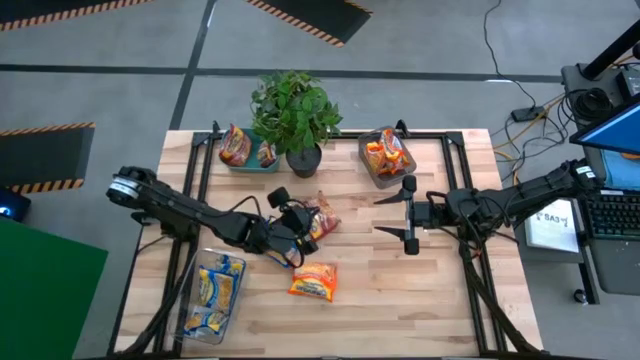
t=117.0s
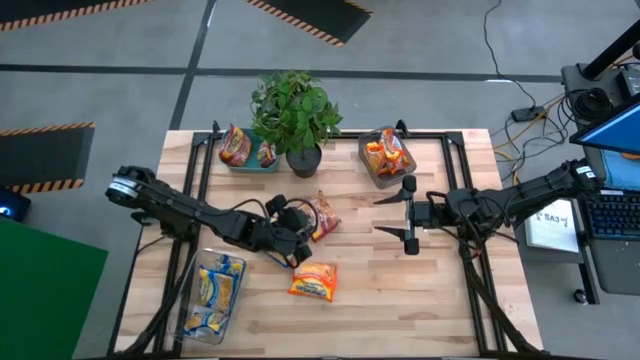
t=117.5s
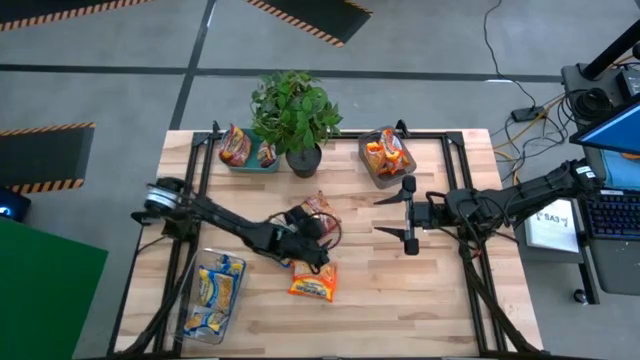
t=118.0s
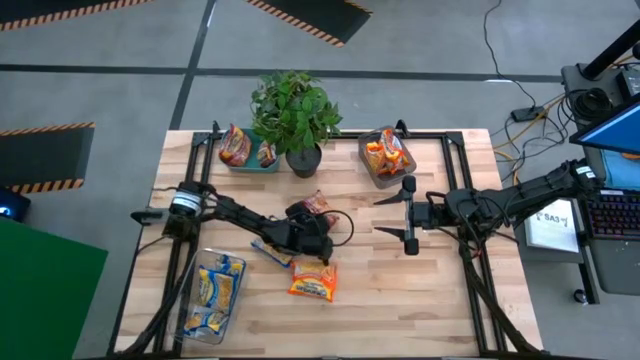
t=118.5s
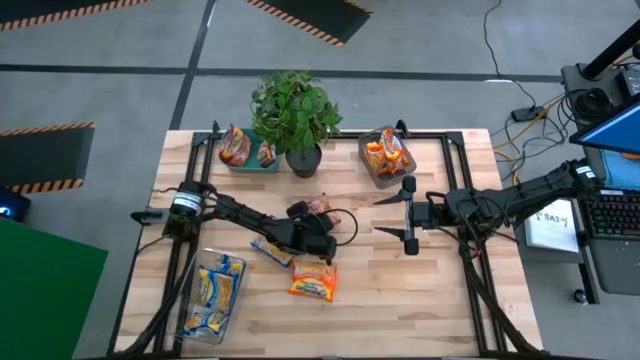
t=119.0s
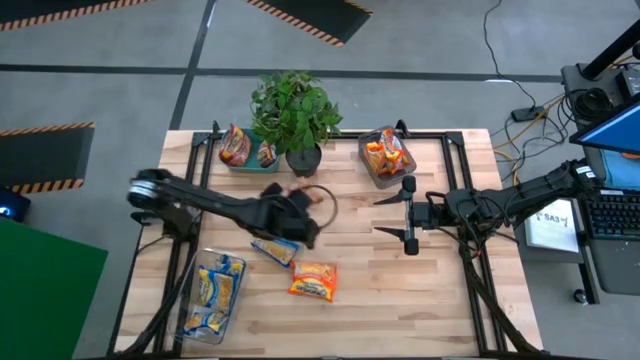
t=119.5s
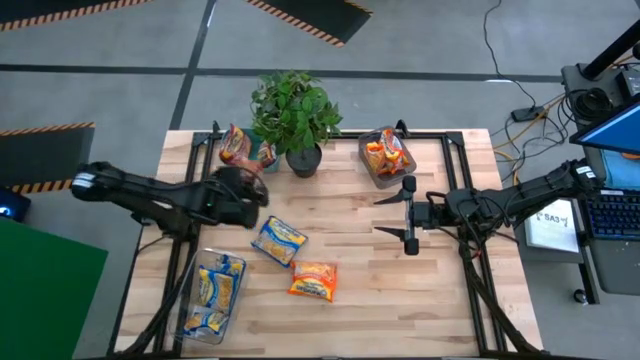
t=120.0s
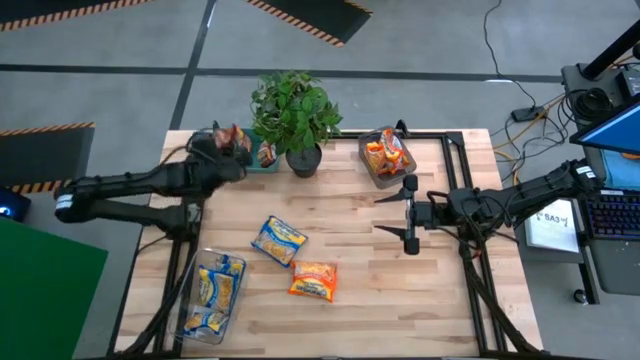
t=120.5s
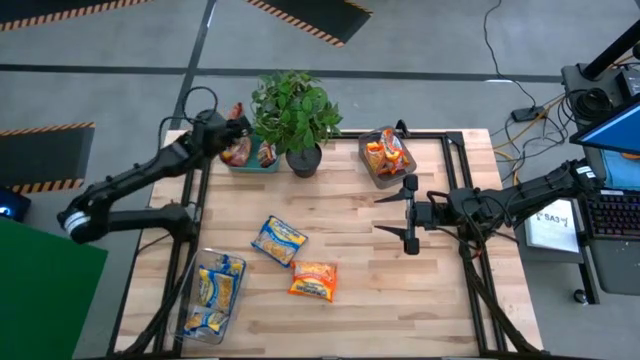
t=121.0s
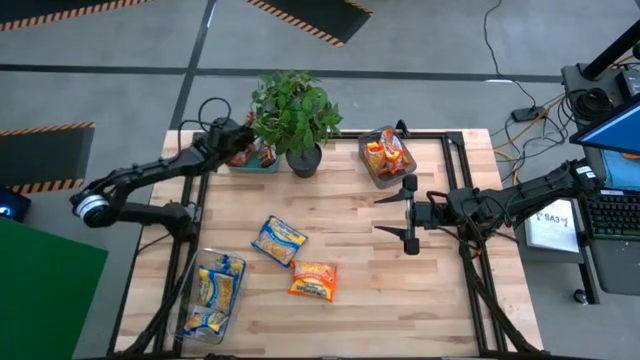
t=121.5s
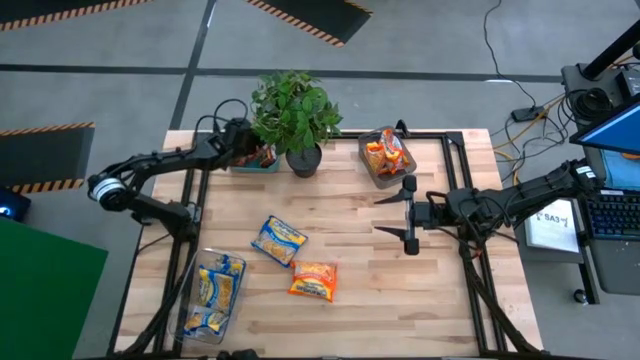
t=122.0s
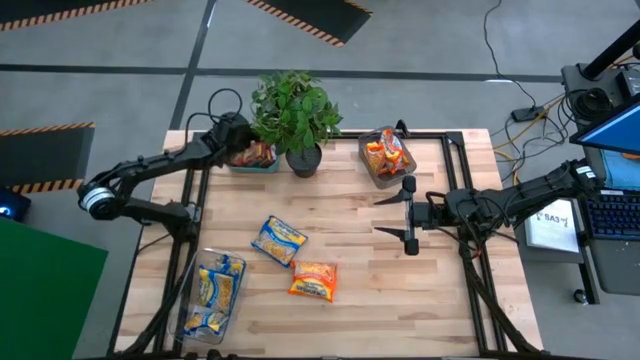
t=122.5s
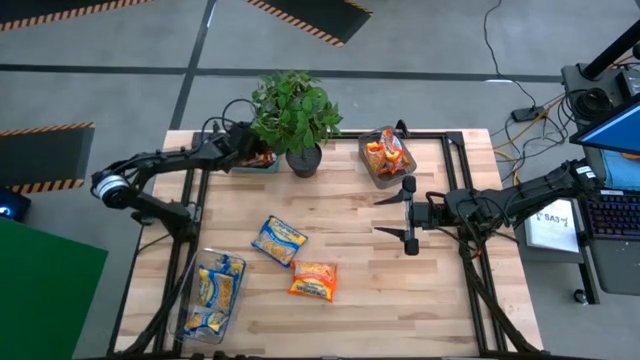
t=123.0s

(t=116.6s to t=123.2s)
Task: Sort Maruchan noodles
Put the red noodle pack into the green bin

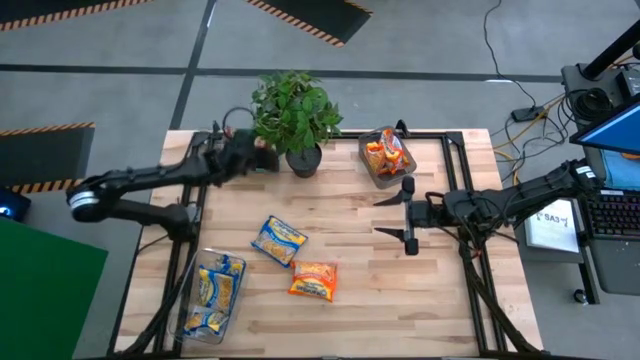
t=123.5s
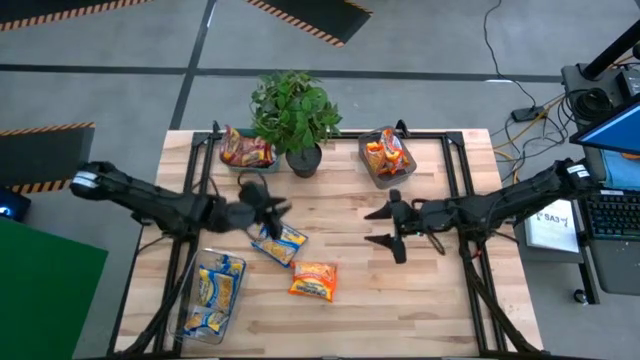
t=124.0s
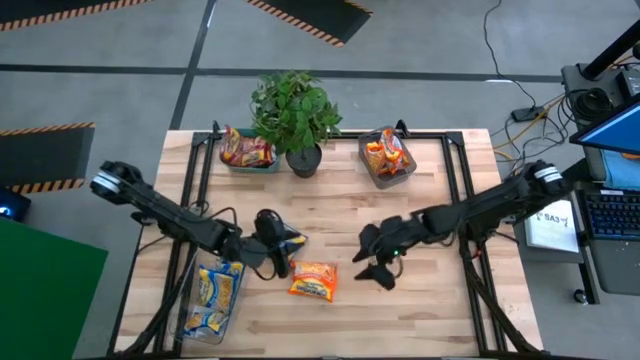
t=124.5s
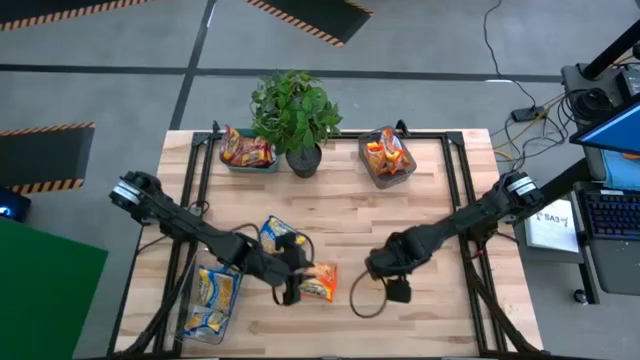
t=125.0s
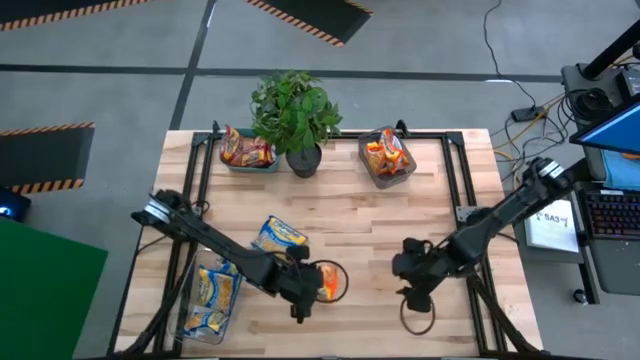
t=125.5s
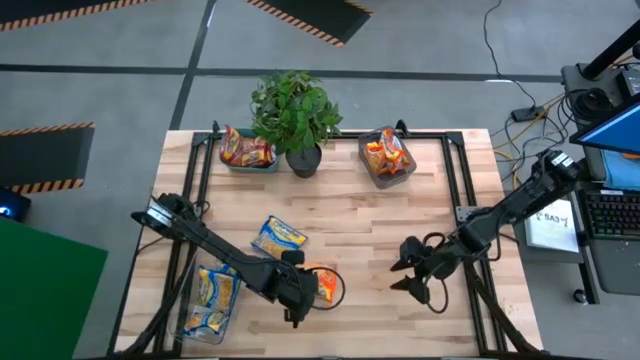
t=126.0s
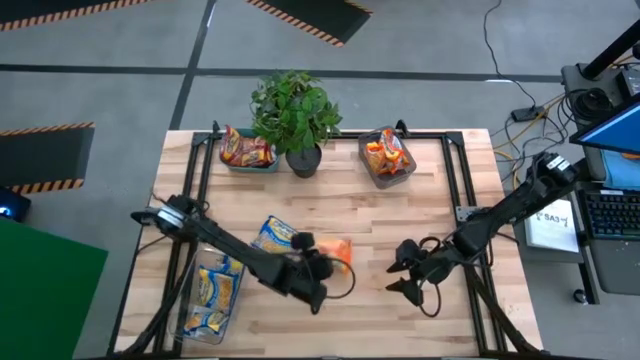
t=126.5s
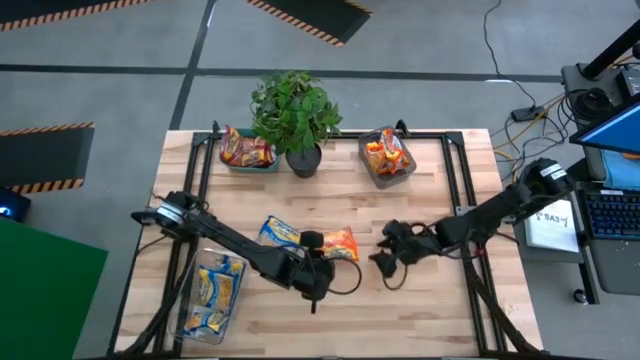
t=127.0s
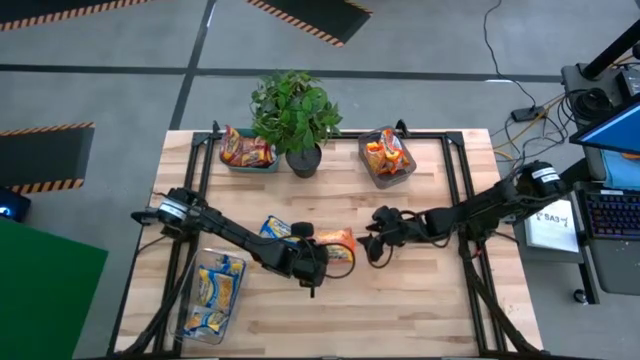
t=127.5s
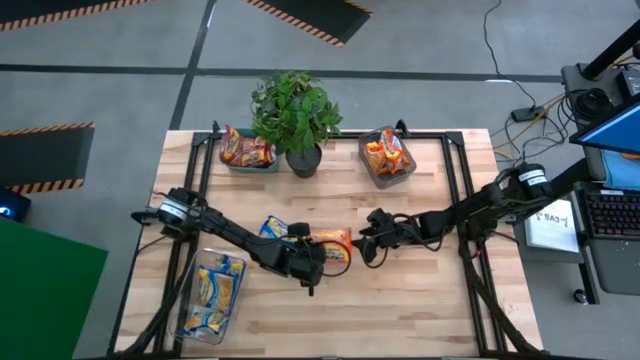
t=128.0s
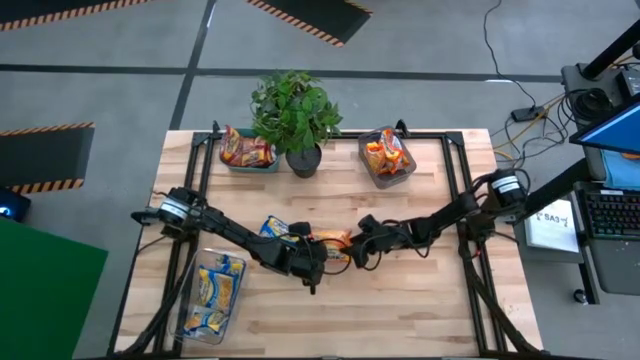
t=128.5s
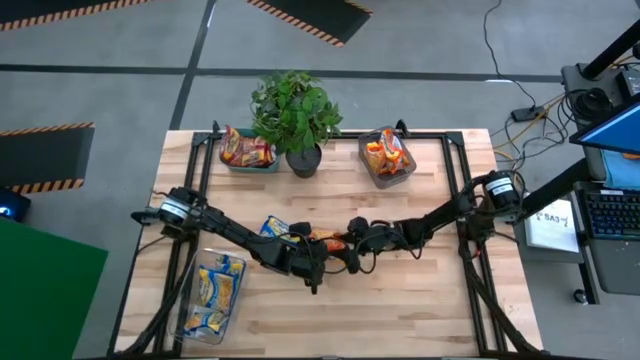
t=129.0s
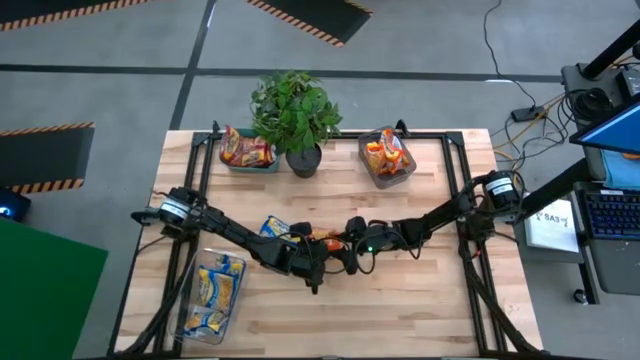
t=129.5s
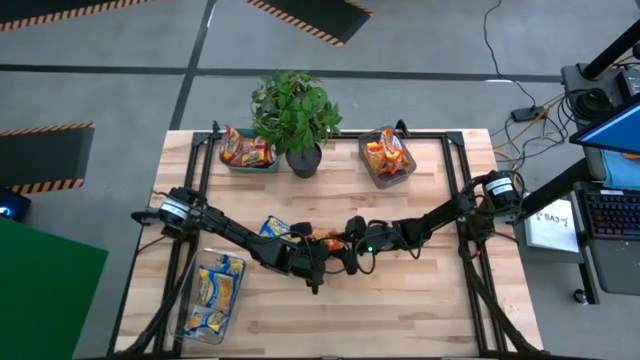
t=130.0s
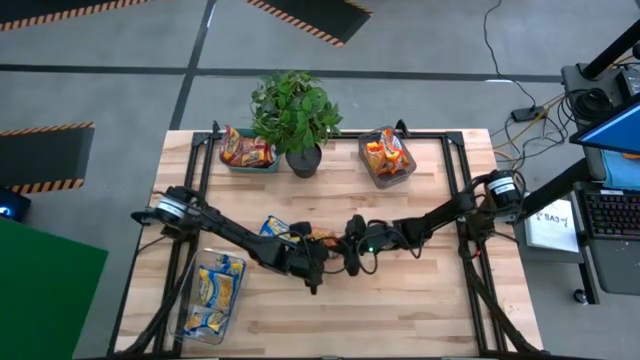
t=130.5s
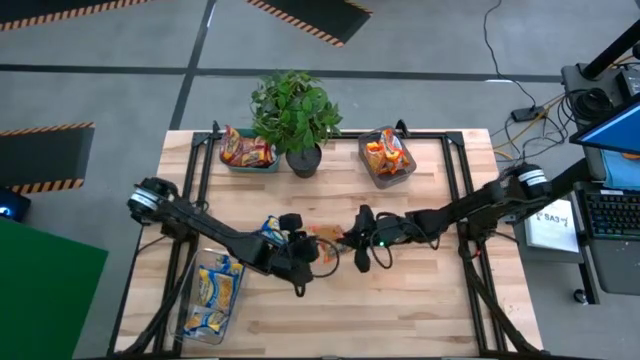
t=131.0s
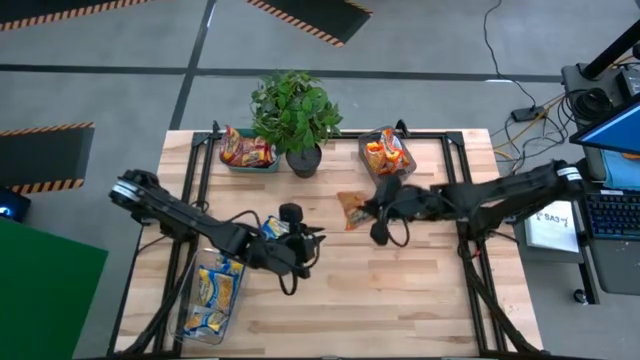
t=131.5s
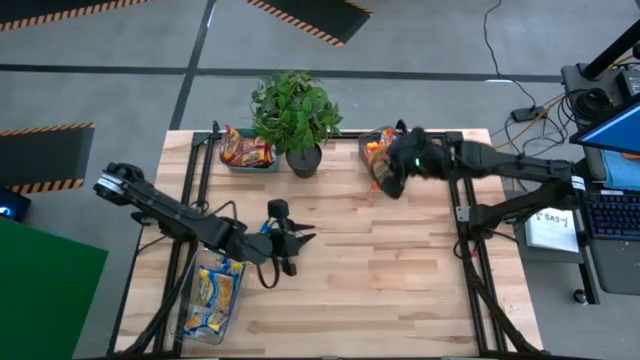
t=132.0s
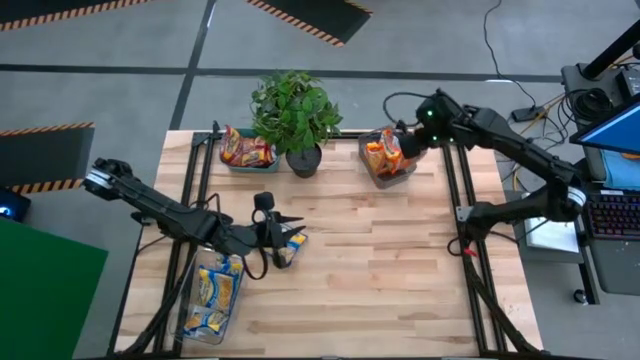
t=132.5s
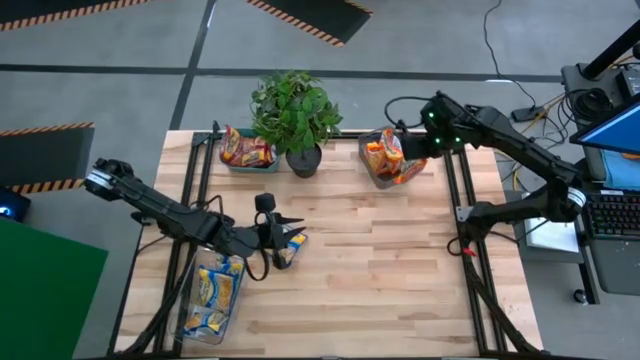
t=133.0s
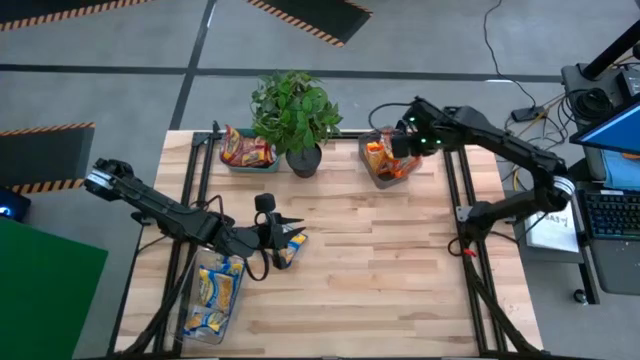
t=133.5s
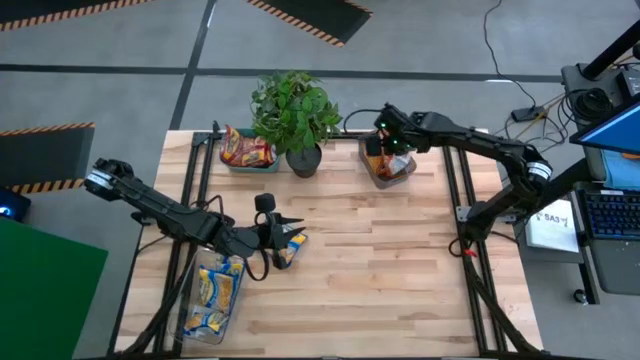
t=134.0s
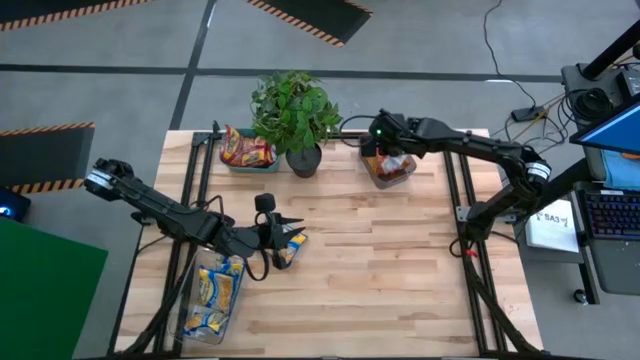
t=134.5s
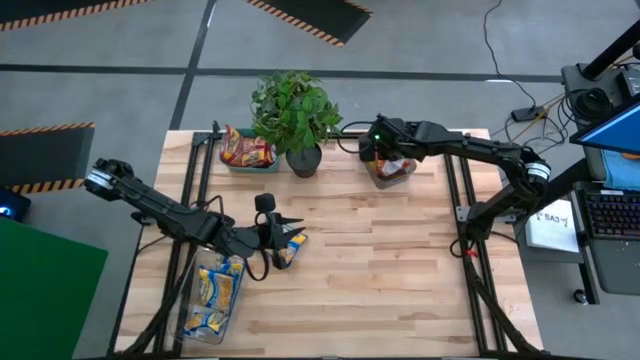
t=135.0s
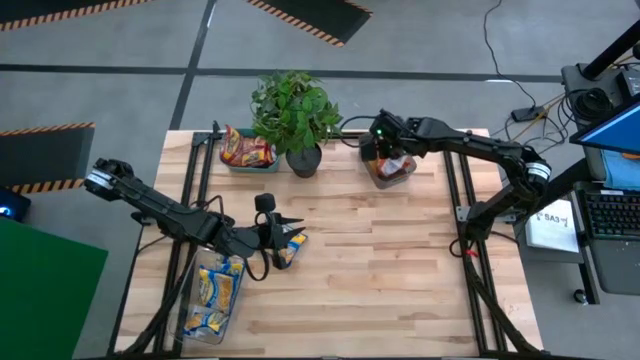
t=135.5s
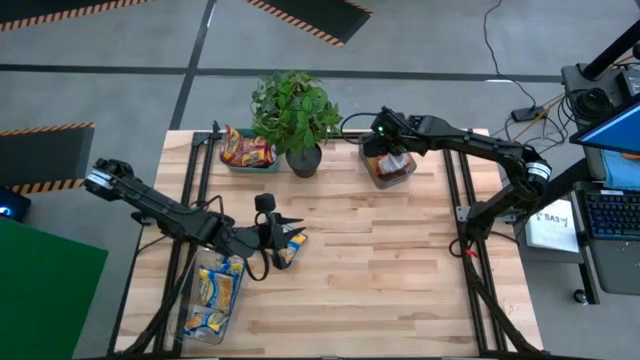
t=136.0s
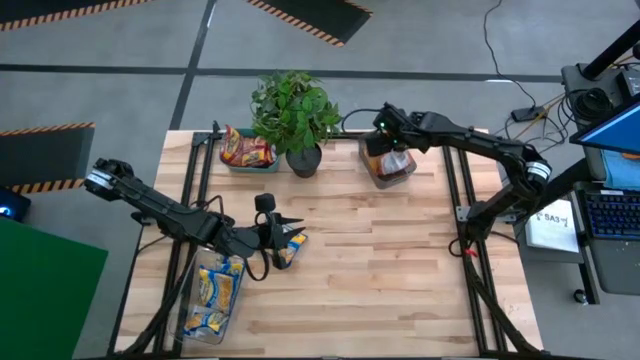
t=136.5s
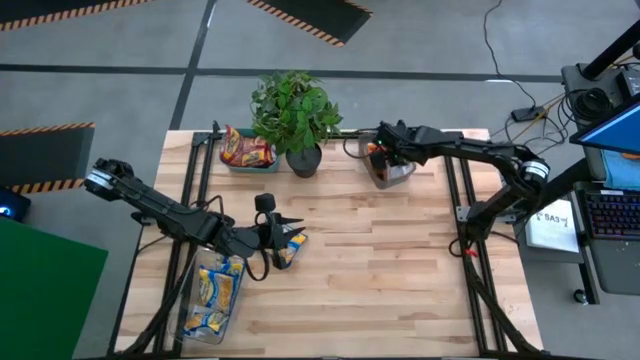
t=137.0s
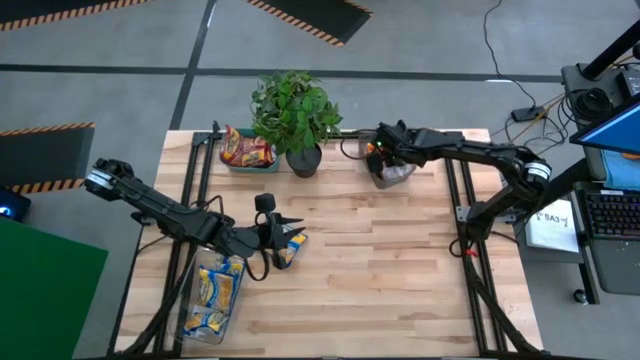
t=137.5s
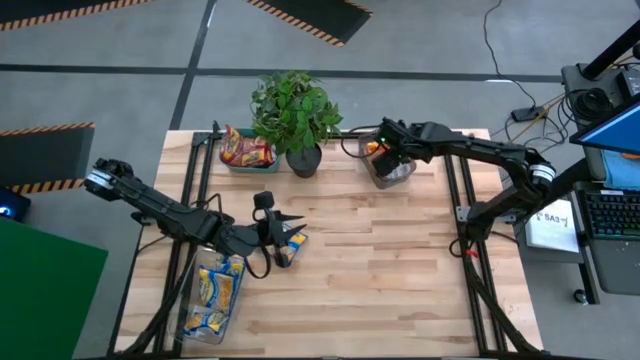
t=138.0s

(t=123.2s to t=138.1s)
Put the orange noodle pack into the black bin
